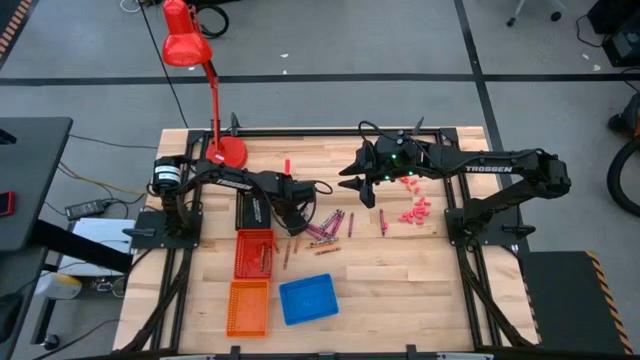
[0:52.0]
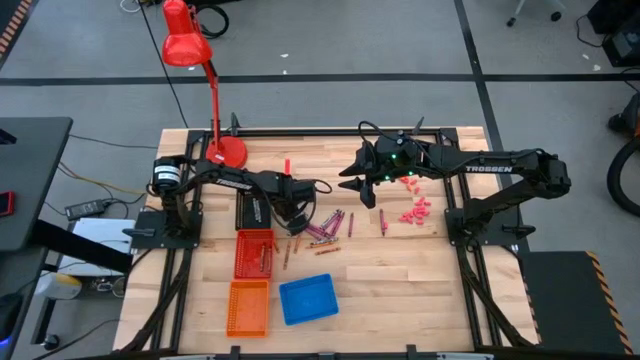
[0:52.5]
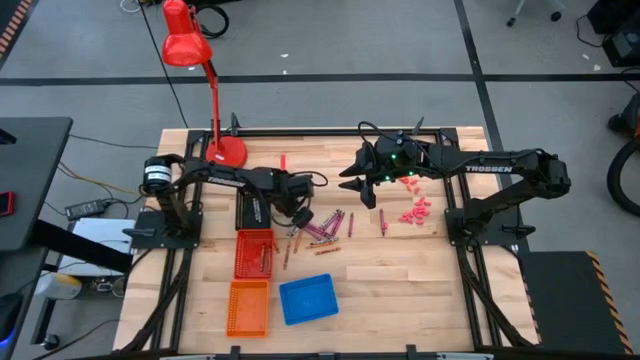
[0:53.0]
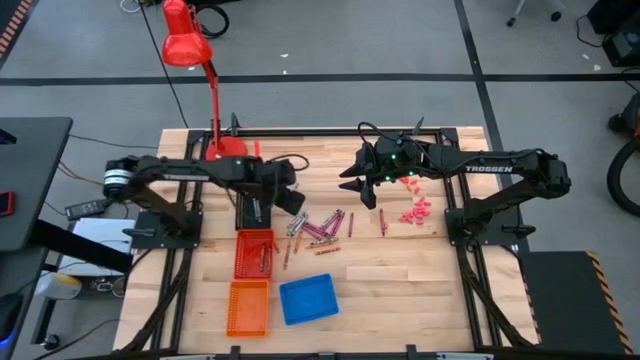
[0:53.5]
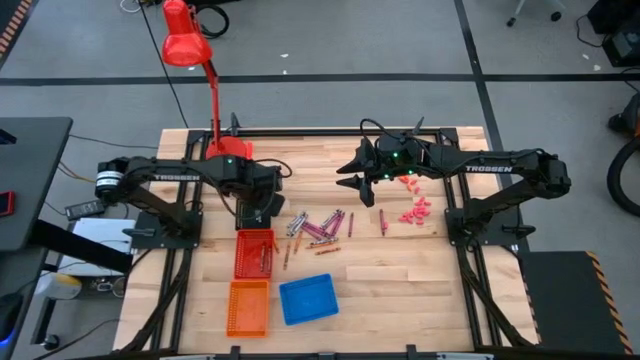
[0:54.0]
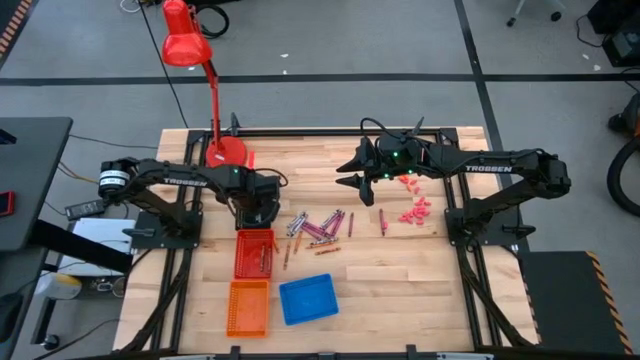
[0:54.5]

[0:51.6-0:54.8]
Task: Sort crayons
Put the black crayon into the black bin

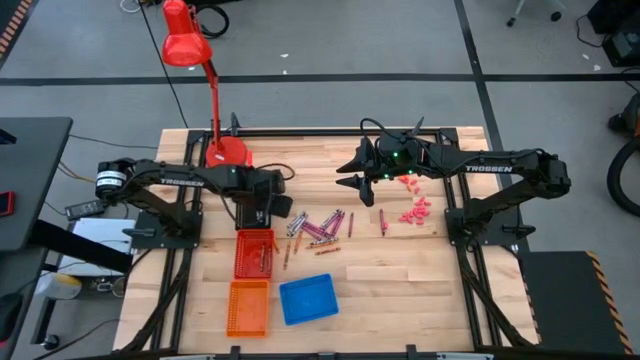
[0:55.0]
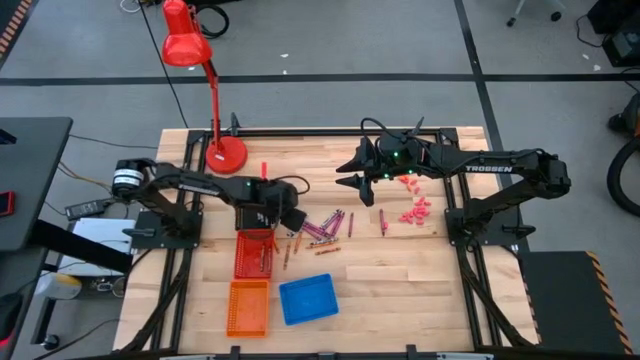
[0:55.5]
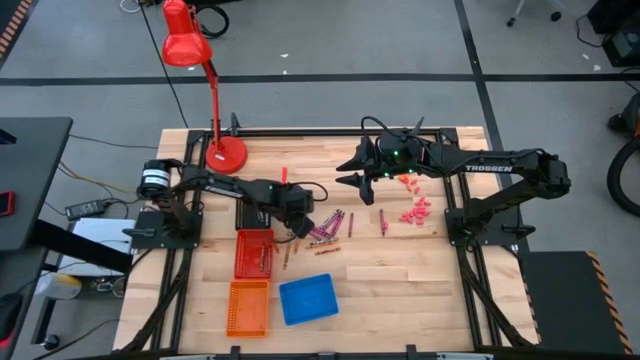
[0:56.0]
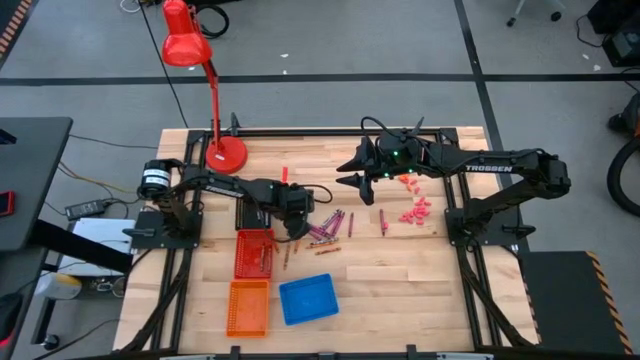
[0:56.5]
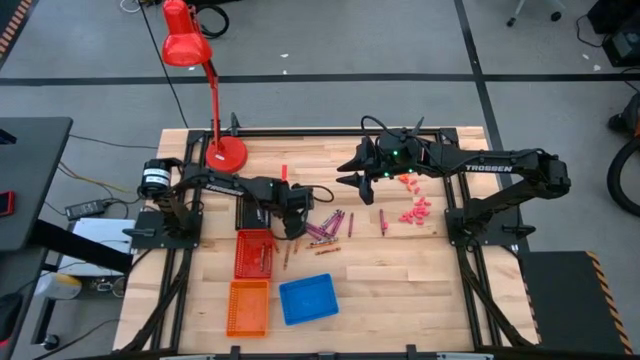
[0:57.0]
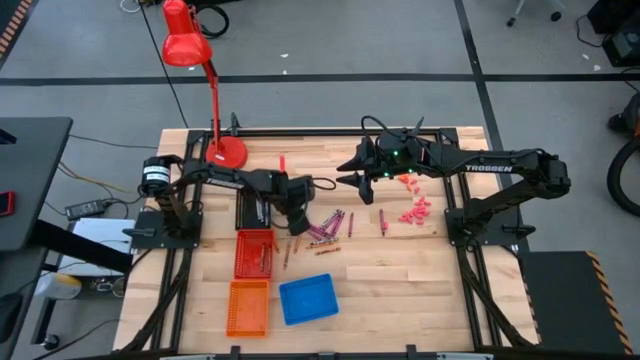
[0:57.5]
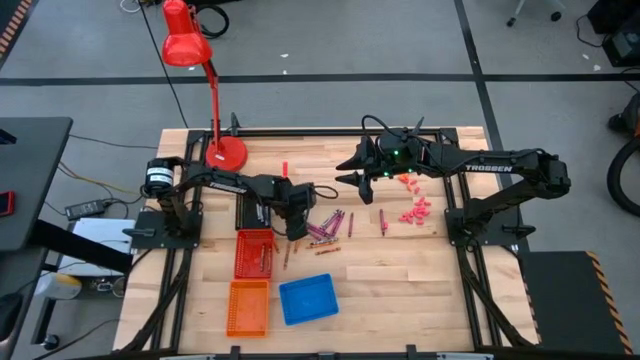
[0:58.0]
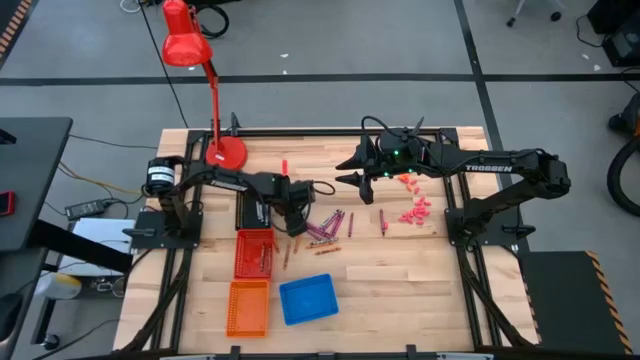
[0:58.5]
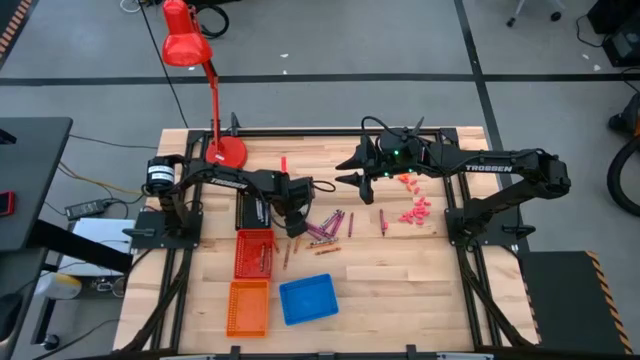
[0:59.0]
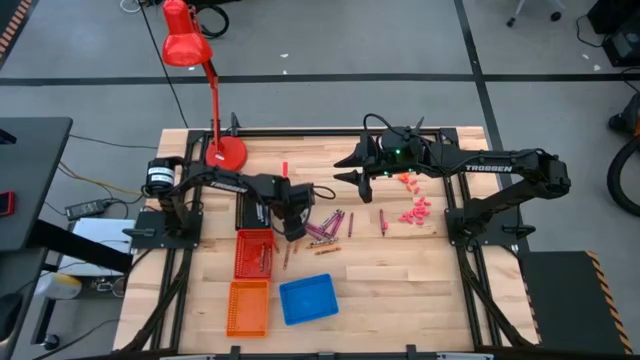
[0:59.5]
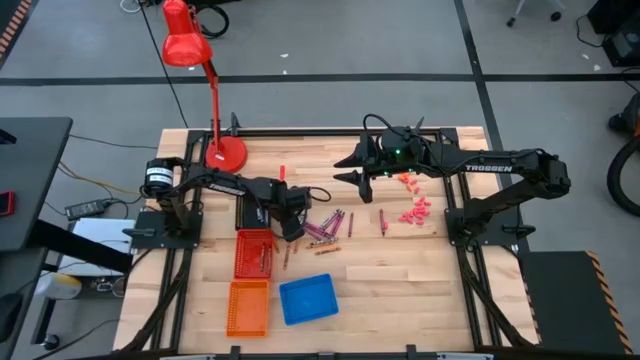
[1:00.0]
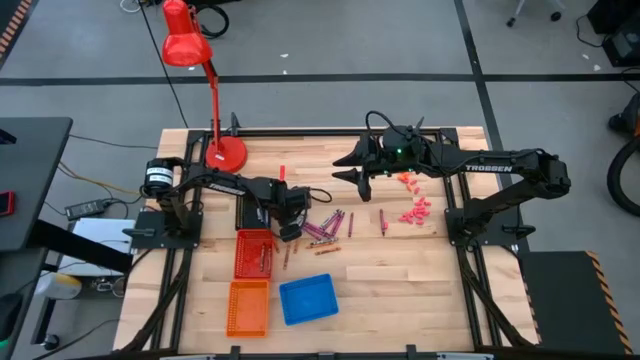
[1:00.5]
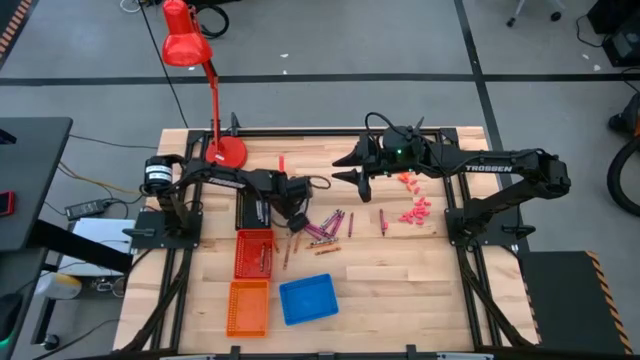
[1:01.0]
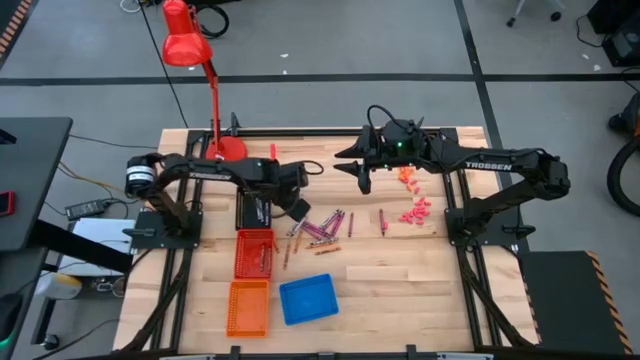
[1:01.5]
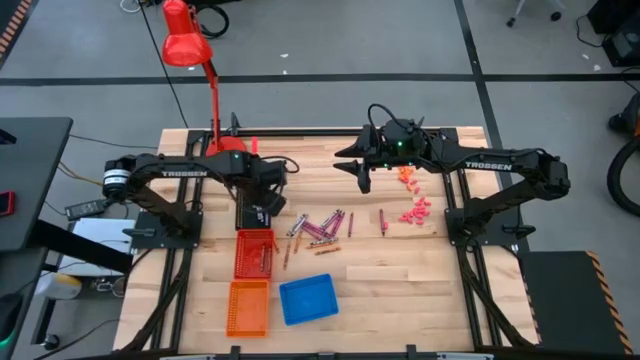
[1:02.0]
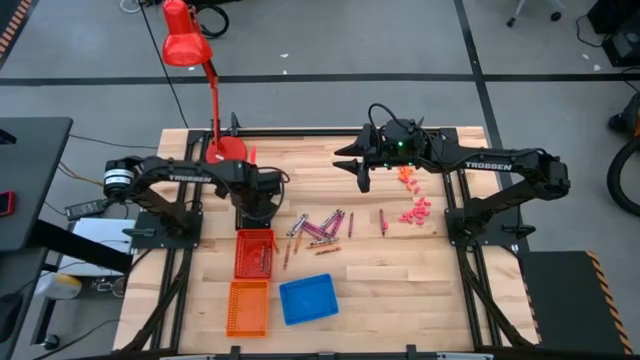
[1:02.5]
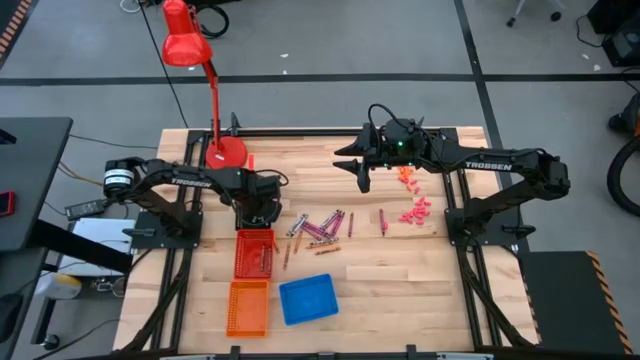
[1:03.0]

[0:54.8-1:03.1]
Put the black crayon into the black bin

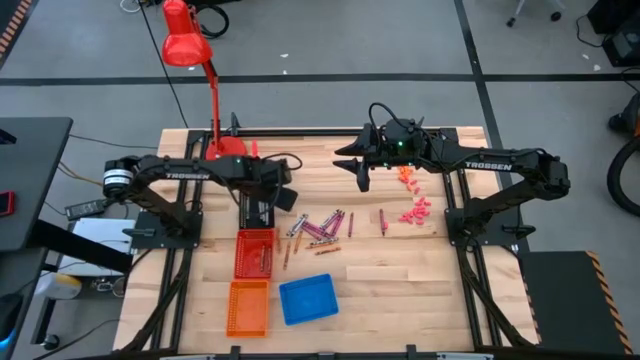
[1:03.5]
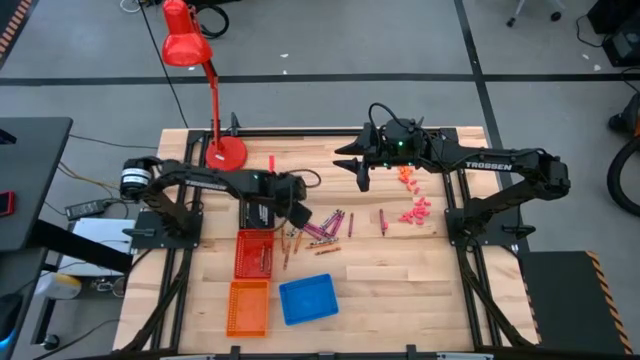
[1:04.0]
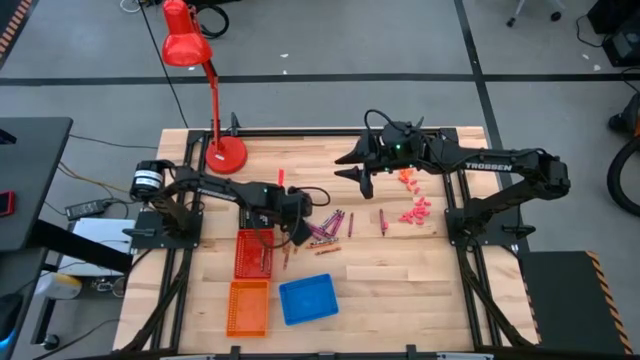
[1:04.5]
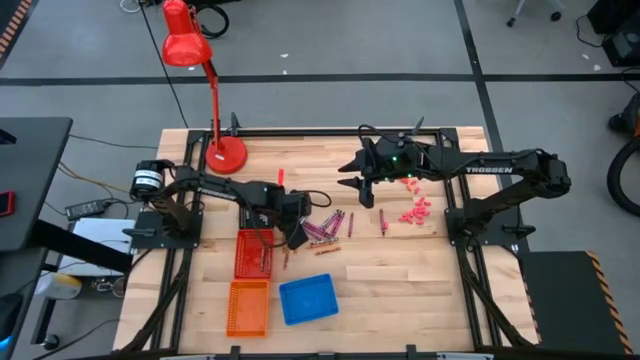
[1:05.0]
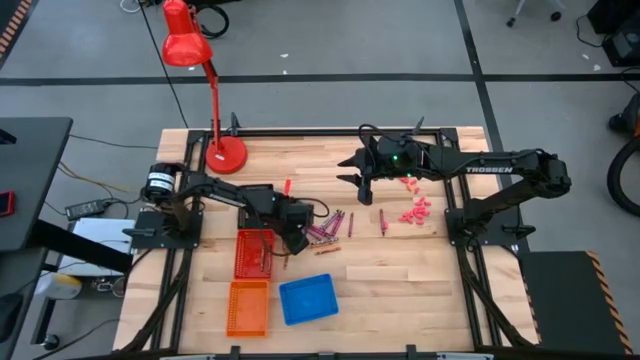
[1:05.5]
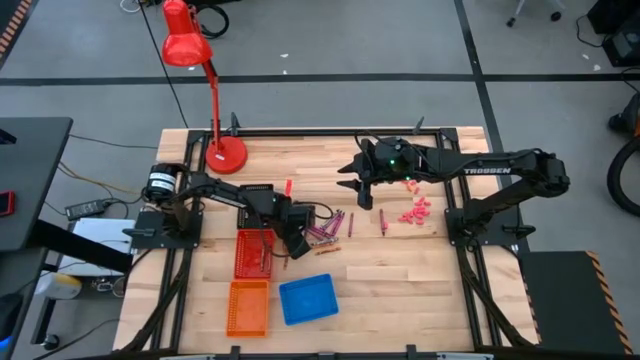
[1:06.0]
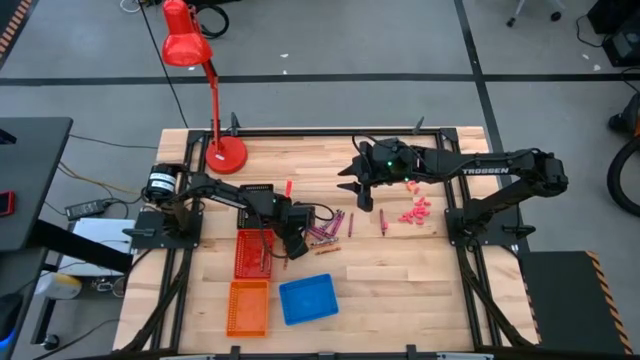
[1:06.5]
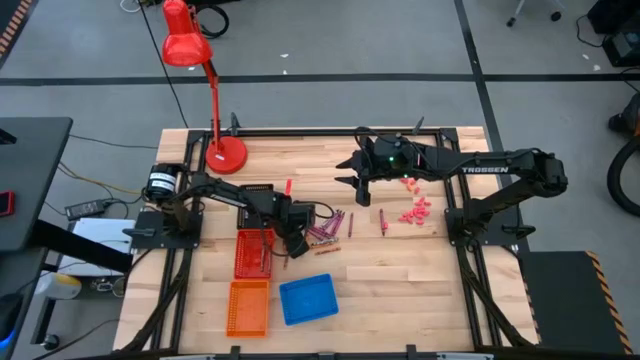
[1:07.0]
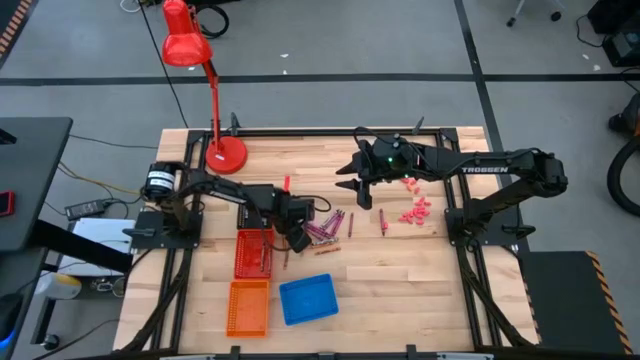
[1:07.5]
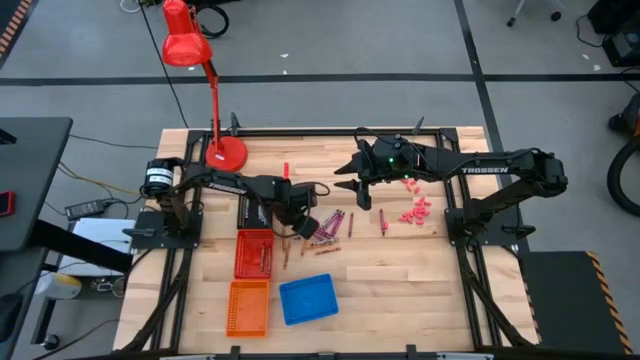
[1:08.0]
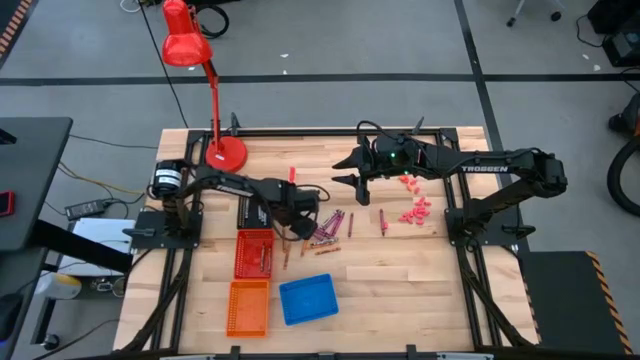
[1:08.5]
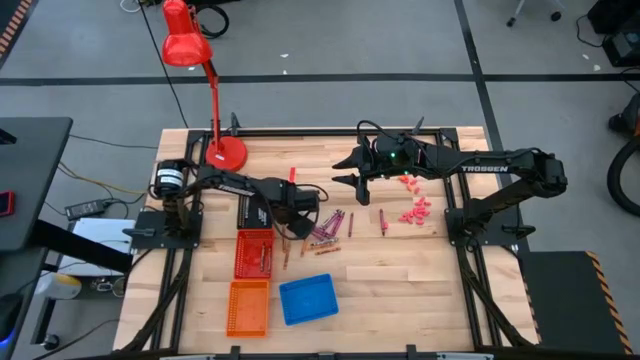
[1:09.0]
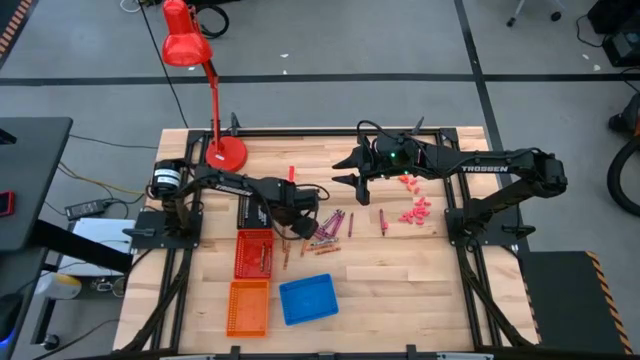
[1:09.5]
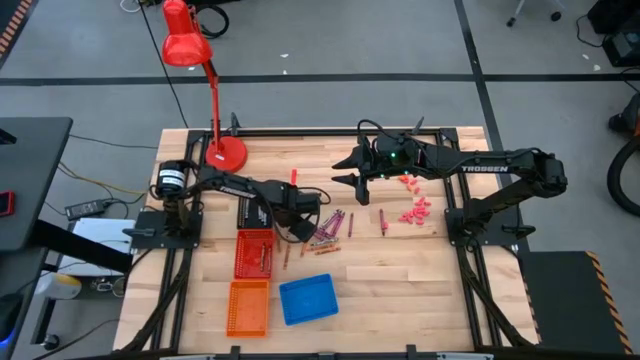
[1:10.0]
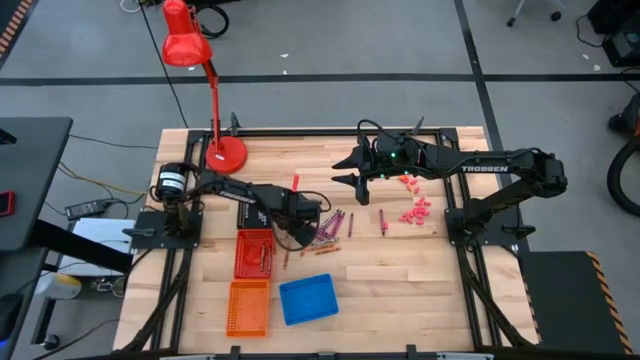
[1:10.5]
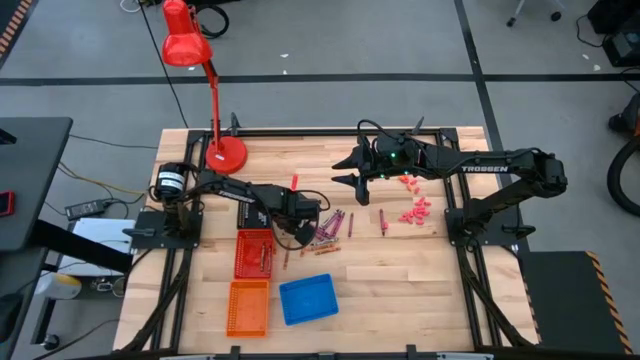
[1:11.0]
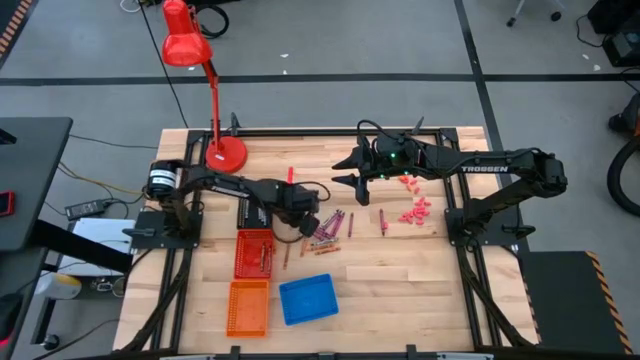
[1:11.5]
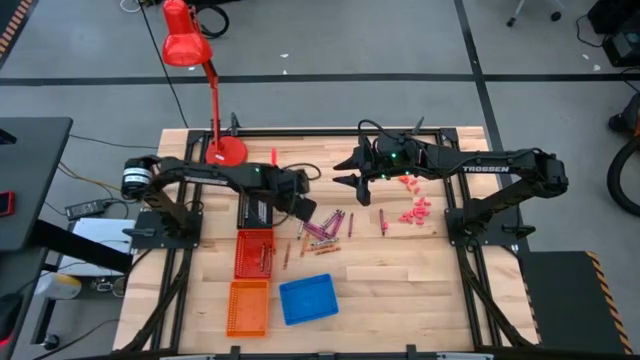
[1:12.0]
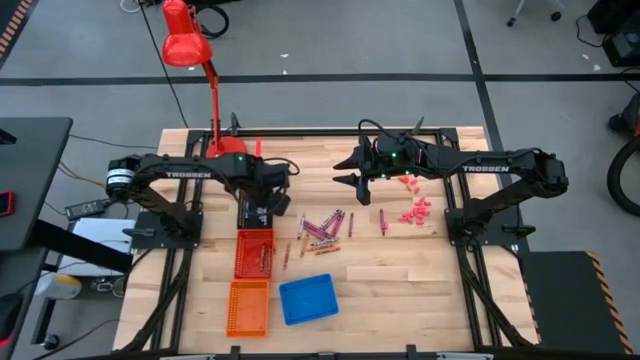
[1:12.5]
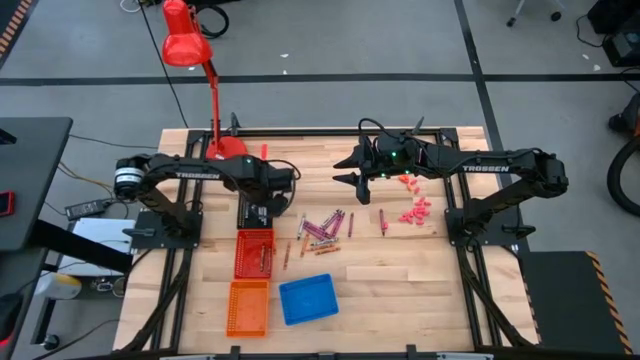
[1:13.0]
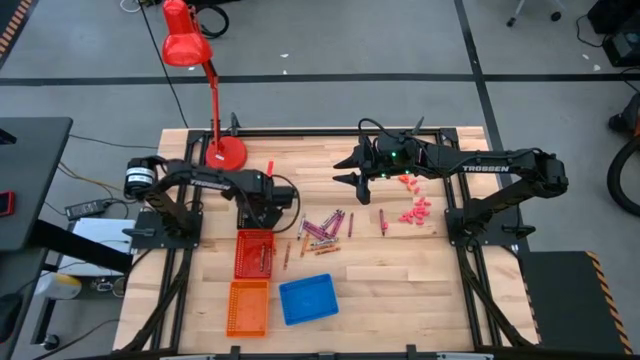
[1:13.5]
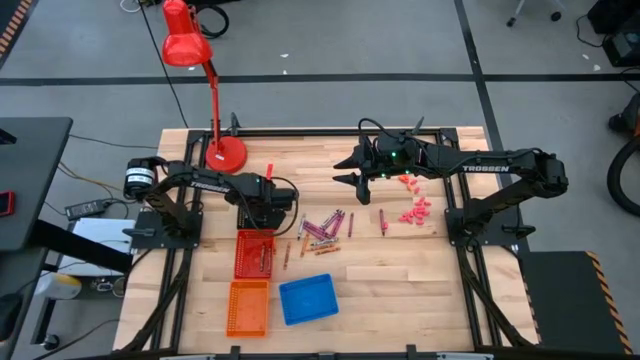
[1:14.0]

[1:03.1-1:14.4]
Put the black crayon into the black bin
